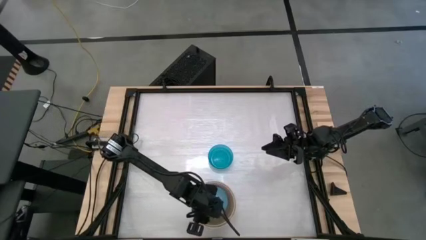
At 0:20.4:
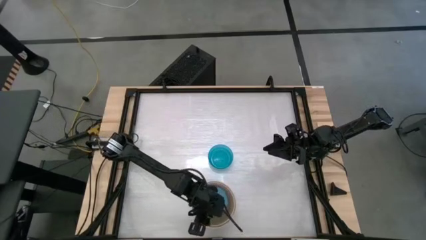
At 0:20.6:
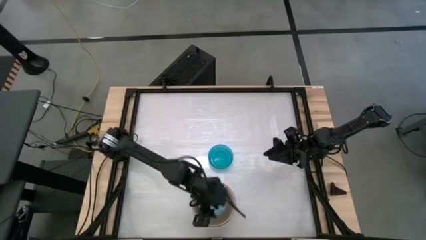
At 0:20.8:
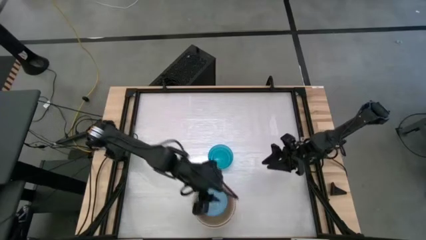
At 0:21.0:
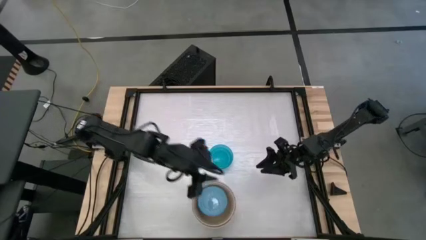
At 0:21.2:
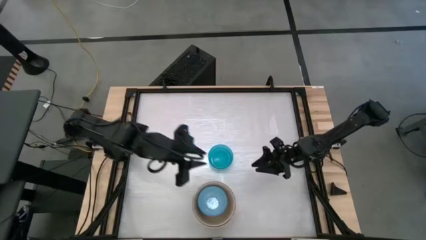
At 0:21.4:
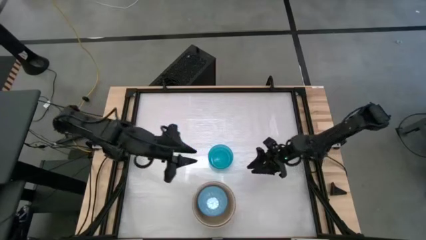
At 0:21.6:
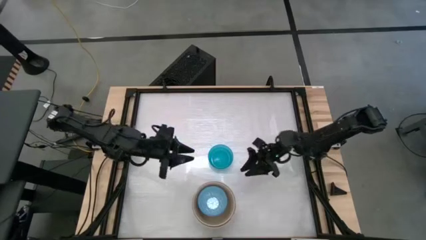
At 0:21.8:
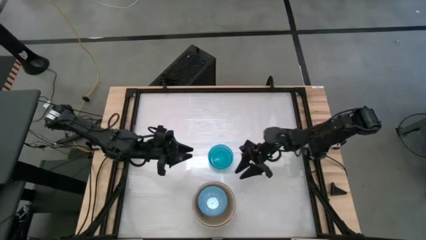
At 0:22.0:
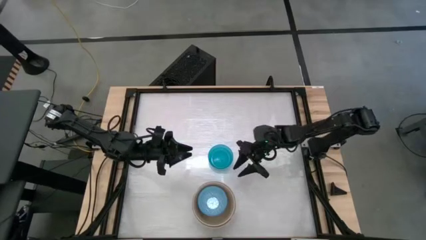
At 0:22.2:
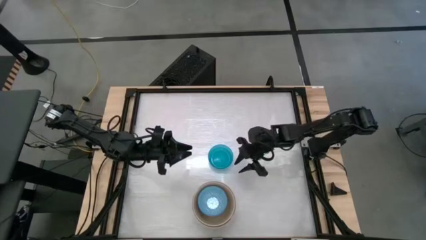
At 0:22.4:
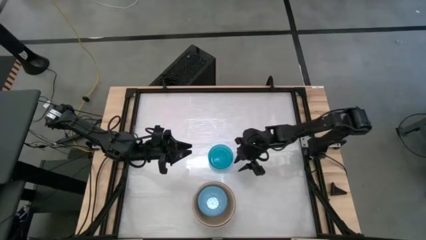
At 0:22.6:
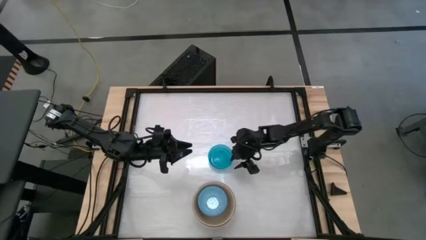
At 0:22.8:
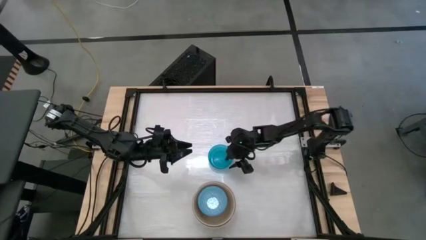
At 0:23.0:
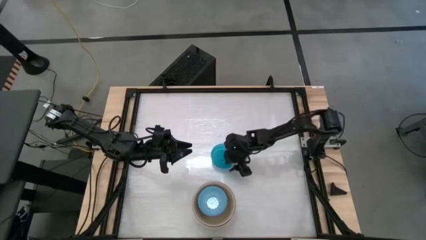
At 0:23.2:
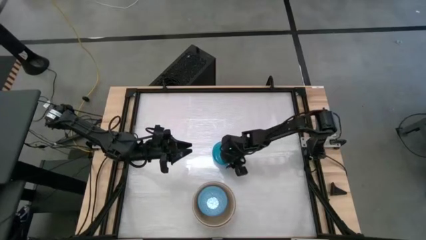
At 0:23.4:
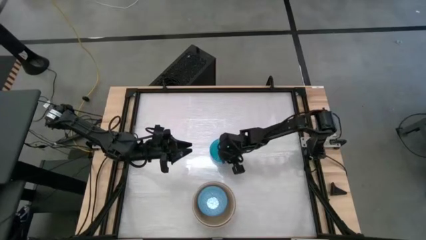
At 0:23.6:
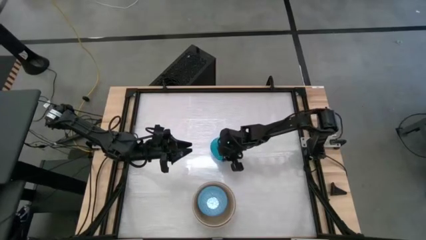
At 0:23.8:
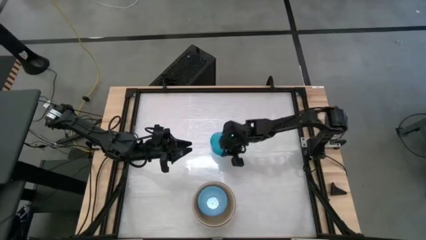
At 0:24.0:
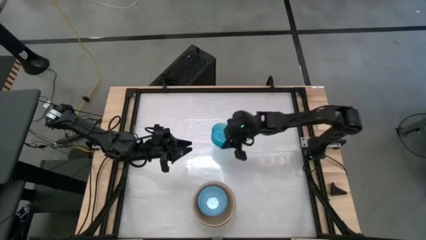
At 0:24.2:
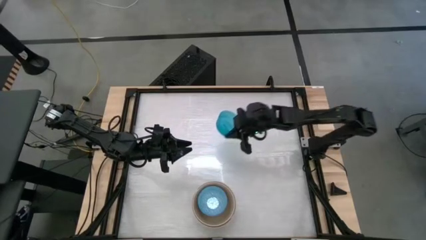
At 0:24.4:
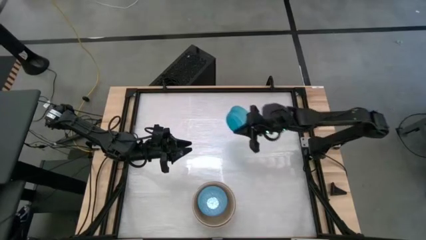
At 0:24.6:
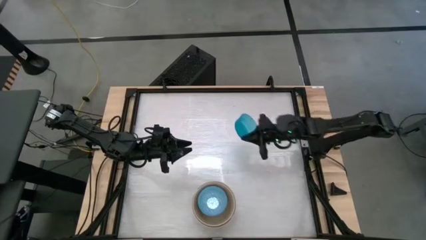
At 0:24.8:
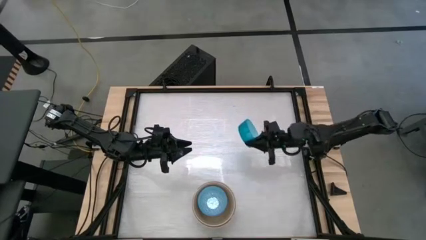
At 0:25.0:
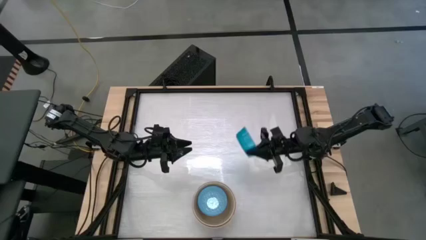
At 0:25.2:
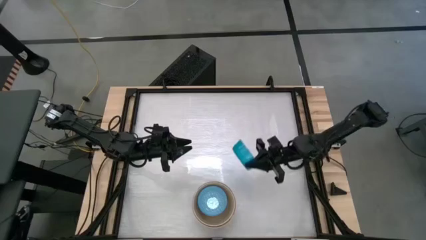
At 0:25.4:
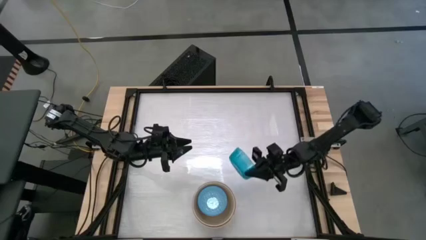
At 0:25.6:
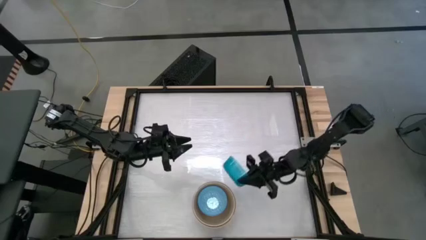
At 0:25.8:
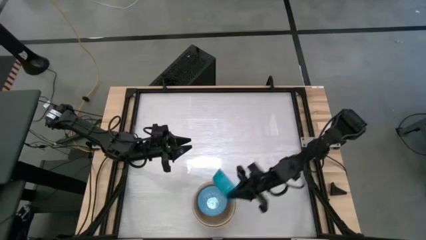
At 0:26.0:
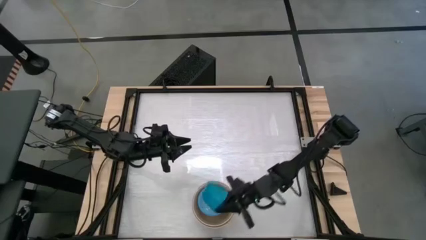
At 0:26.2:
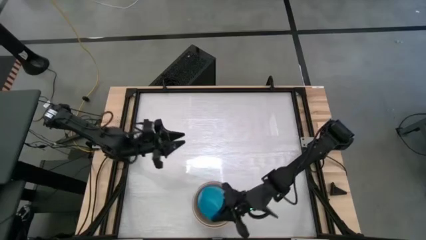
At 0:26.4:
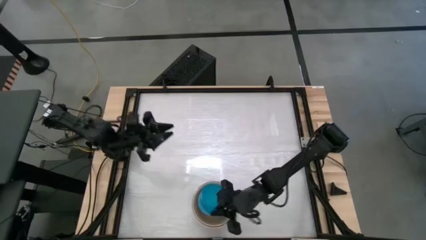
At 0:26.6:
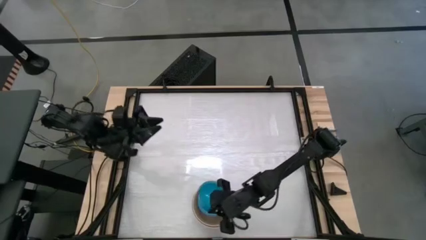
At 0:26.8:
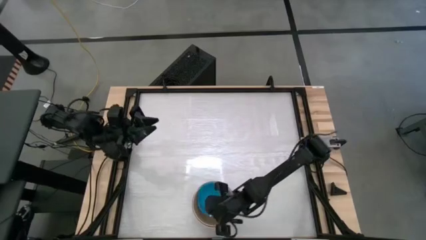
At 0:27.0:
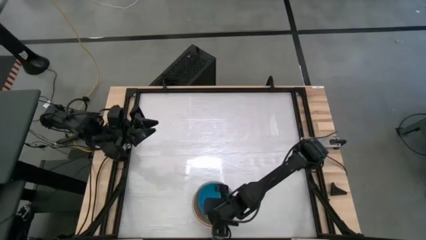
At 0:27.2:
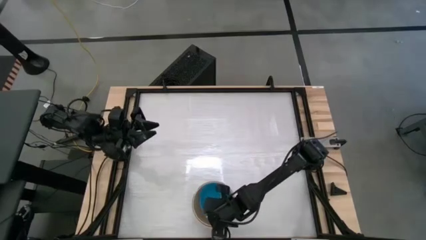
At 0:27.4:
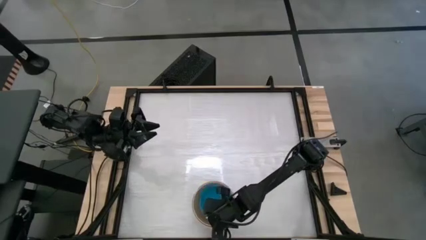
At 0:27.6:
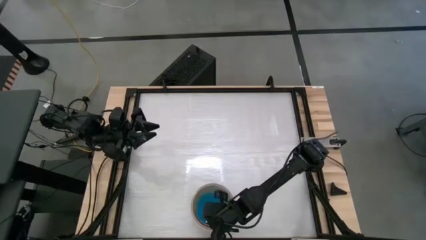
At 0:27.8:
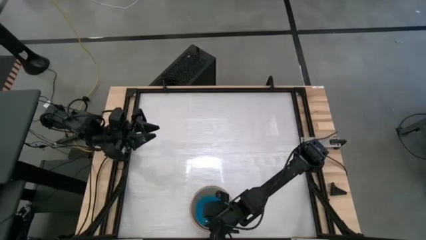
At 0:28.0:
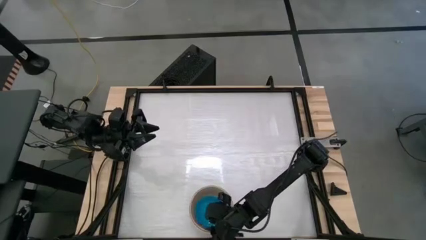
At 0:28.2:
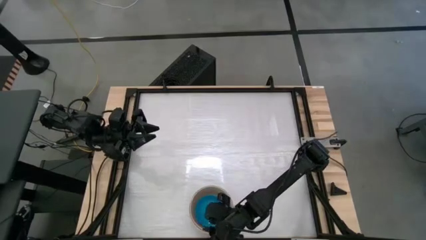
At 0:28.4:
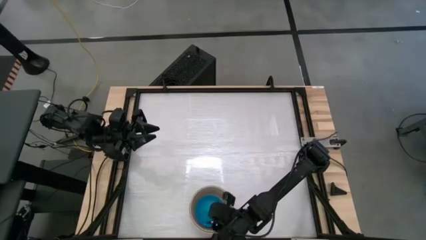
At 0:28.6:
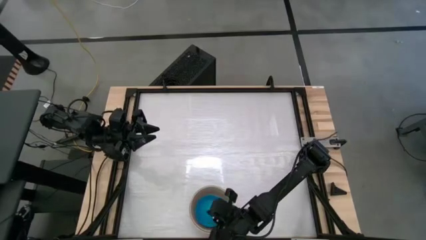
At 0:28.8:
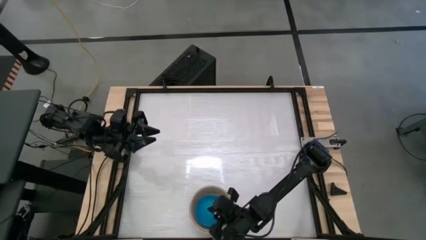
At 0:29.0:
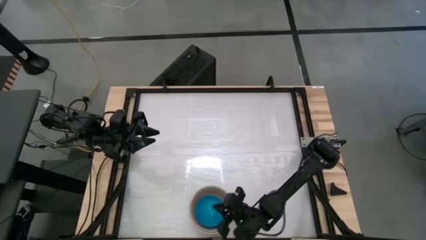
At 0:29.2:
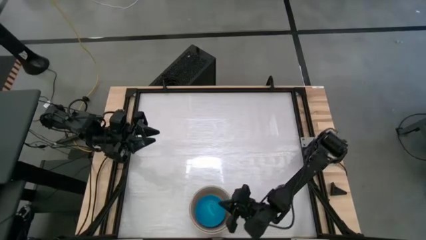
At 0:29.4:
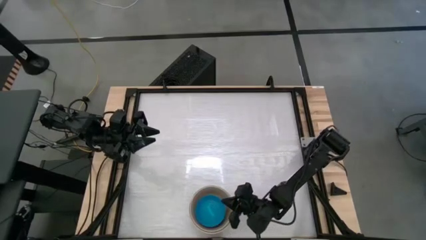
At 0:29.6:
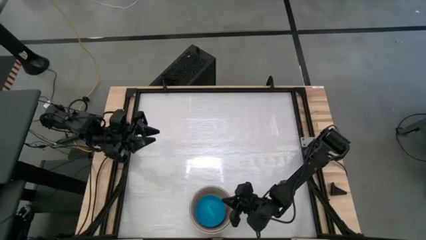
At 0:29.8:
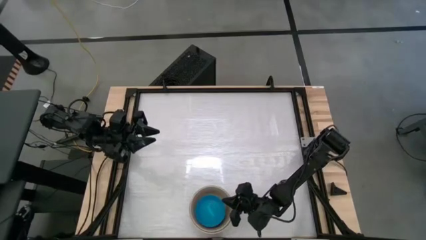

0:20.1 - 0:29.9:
Stack the blue bowl on top of the blue patterned bowl

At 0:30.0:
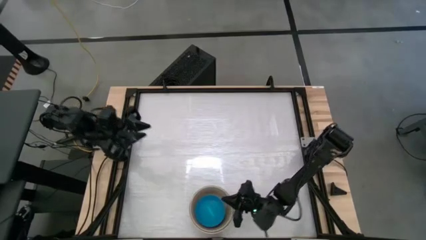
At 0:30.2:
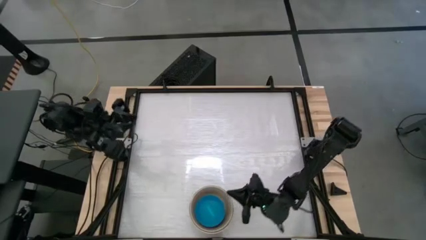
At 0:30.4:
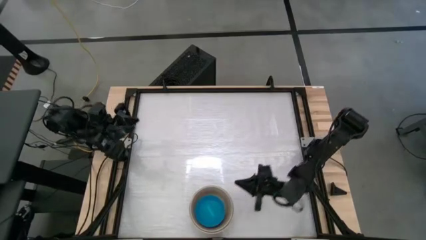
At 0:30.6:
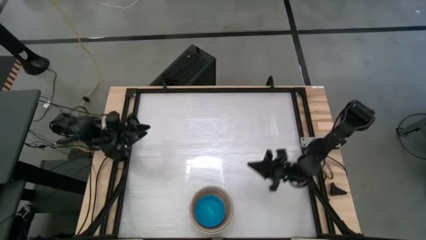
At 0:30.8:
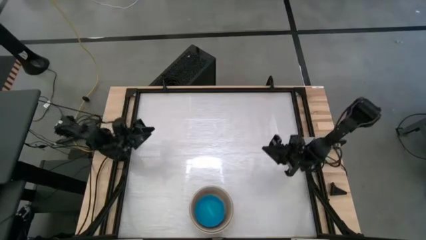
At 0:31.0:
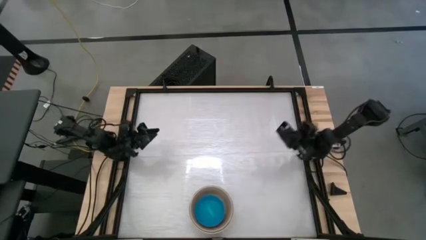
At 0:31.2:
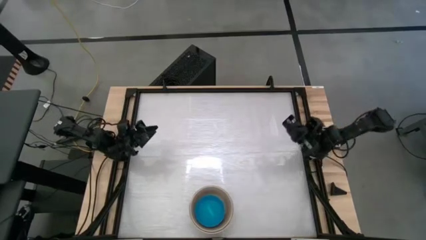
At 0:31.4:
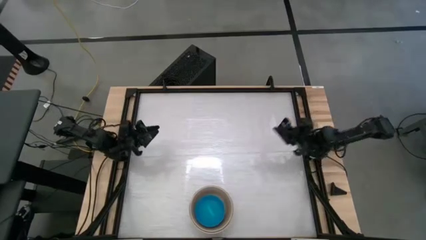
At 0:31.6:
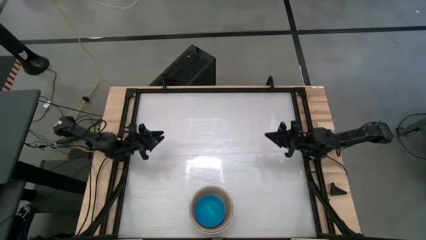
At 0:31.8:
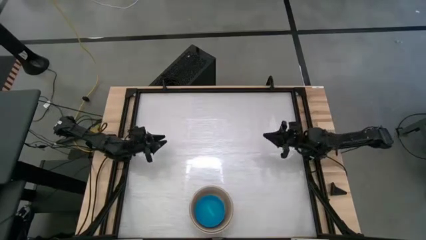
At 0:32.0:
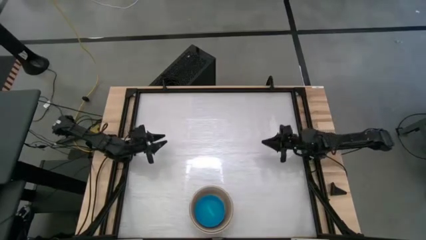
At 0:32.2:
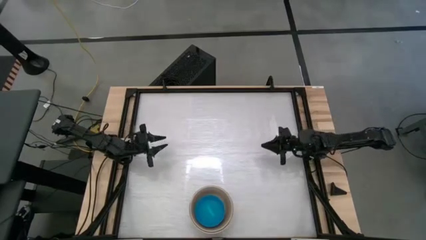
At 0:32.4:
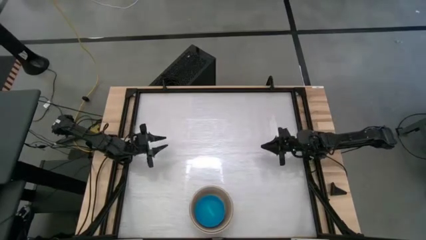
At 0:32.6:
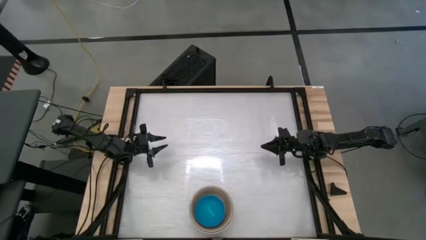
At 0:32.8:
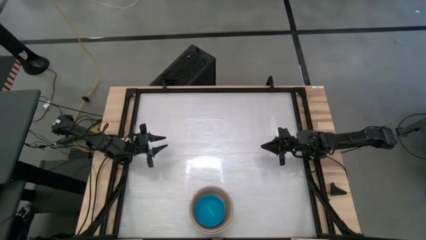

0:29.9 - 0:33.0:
Return to Home Position
